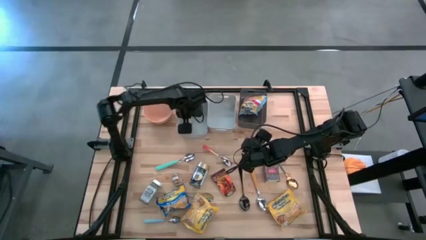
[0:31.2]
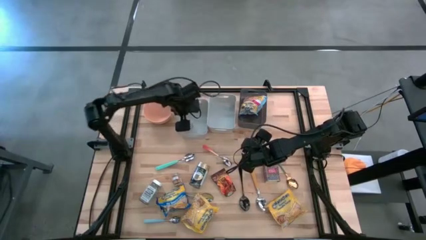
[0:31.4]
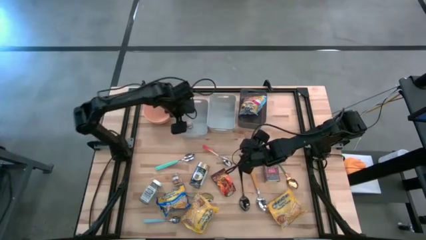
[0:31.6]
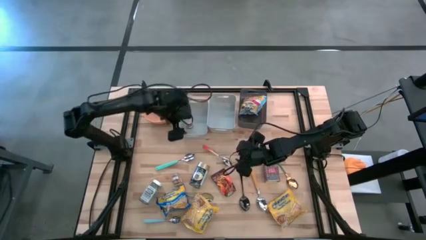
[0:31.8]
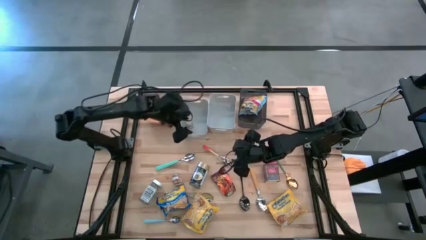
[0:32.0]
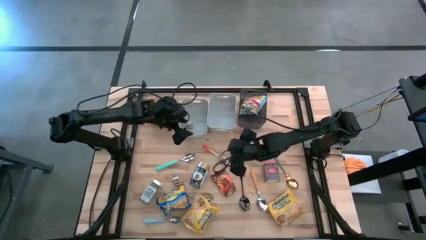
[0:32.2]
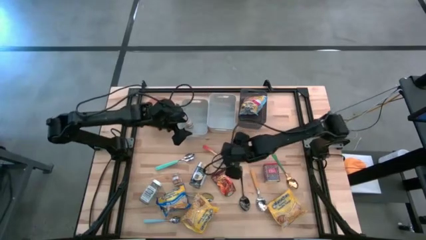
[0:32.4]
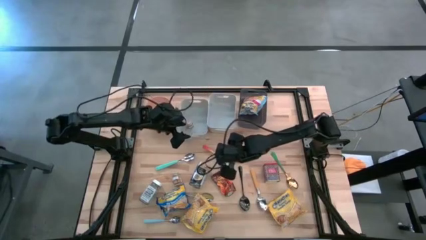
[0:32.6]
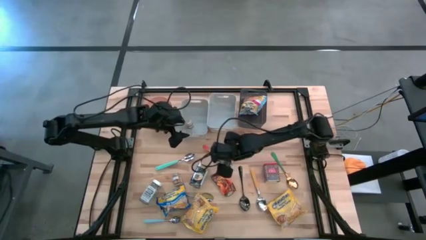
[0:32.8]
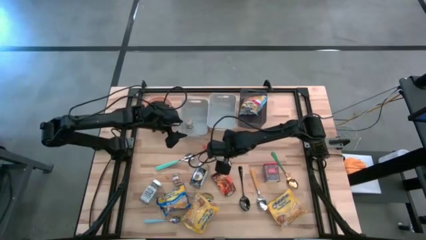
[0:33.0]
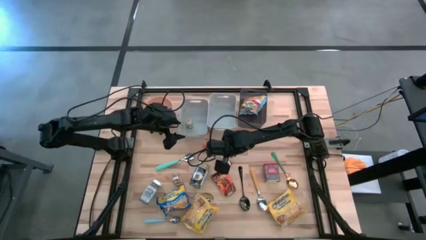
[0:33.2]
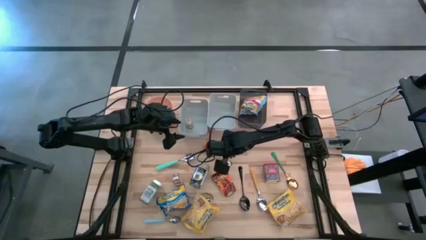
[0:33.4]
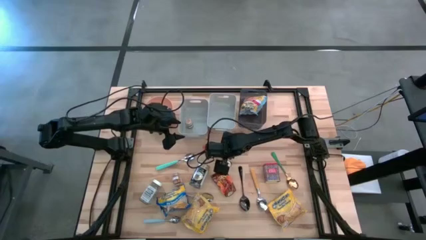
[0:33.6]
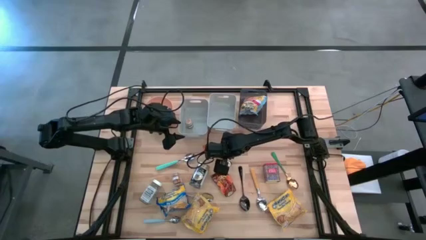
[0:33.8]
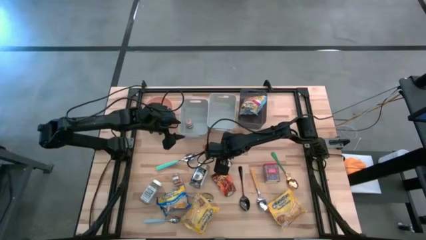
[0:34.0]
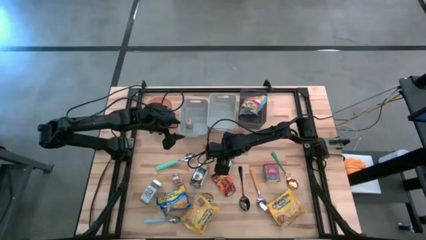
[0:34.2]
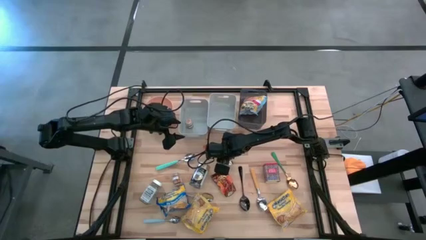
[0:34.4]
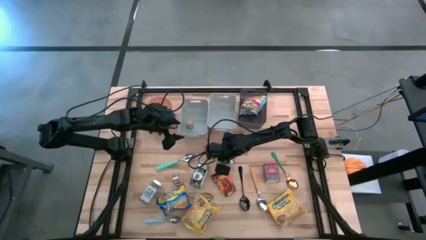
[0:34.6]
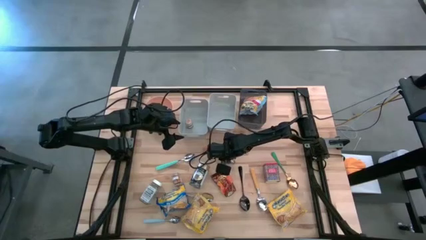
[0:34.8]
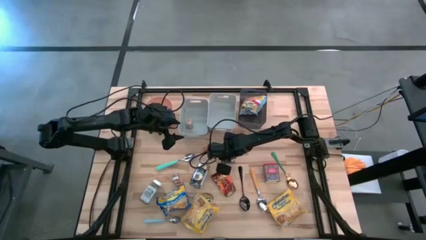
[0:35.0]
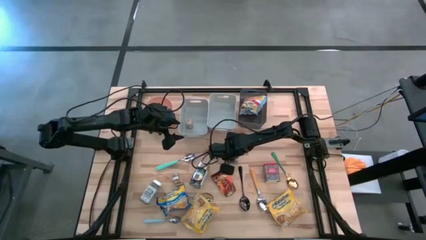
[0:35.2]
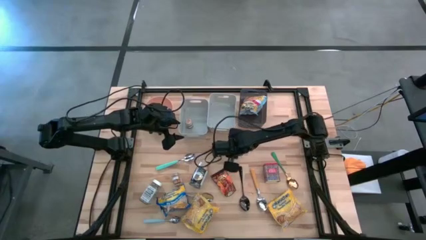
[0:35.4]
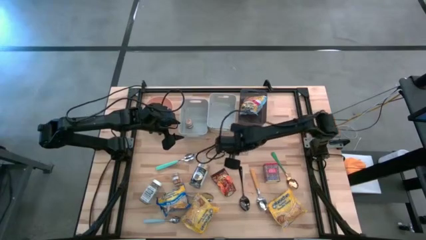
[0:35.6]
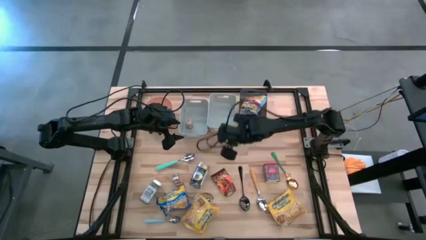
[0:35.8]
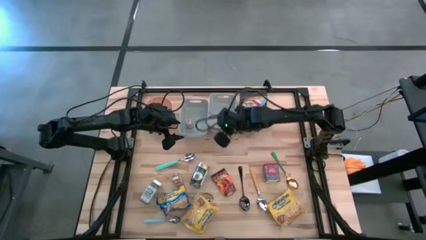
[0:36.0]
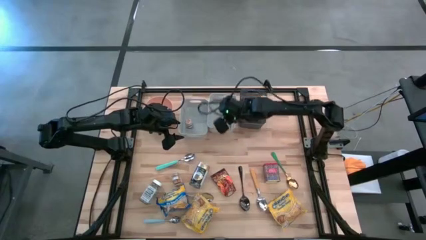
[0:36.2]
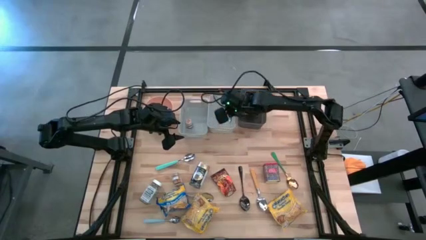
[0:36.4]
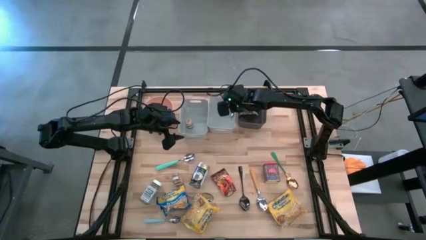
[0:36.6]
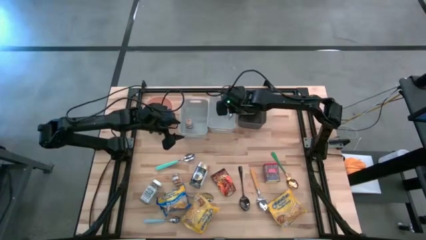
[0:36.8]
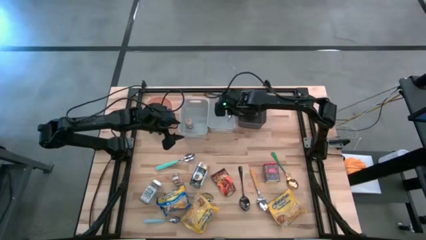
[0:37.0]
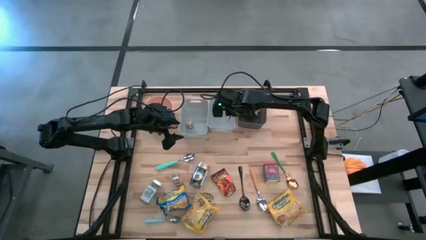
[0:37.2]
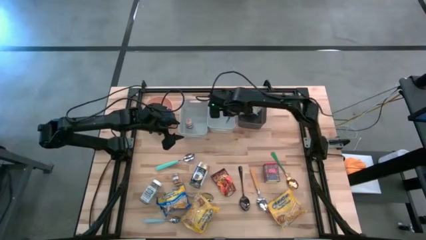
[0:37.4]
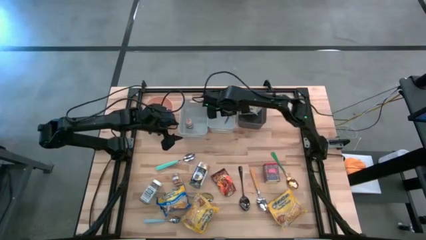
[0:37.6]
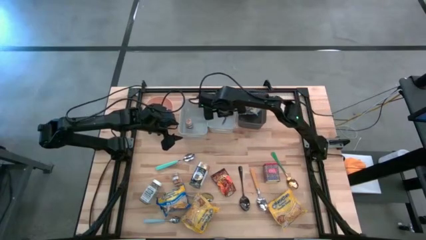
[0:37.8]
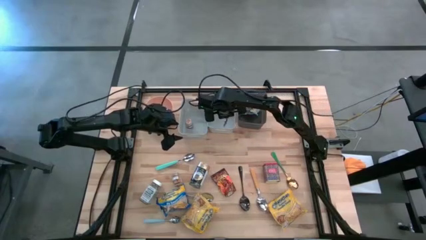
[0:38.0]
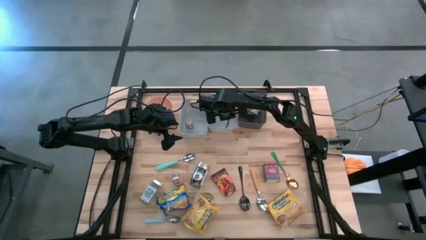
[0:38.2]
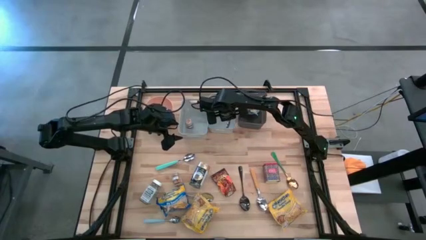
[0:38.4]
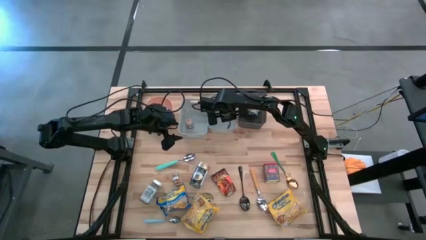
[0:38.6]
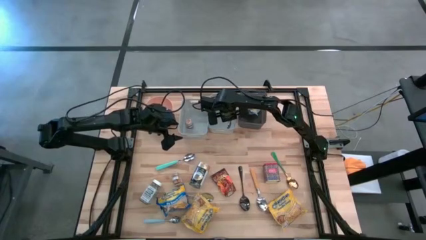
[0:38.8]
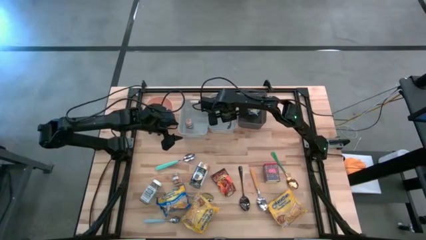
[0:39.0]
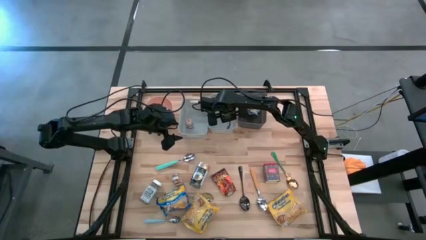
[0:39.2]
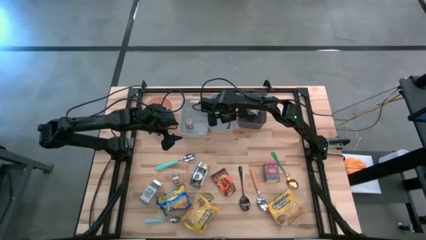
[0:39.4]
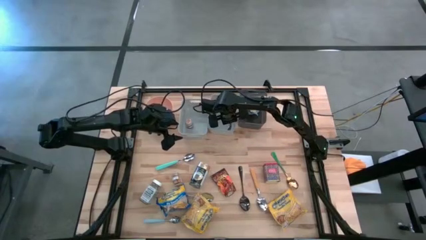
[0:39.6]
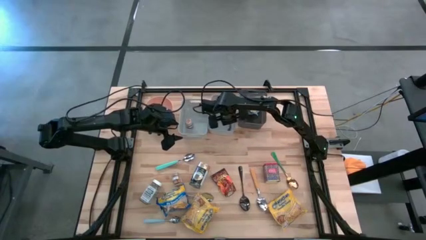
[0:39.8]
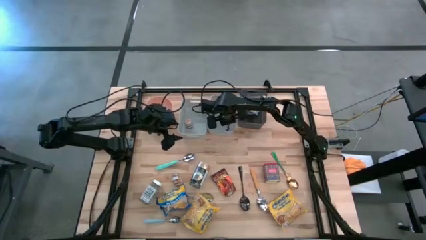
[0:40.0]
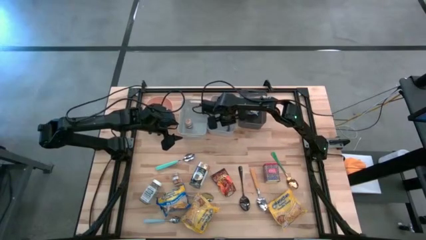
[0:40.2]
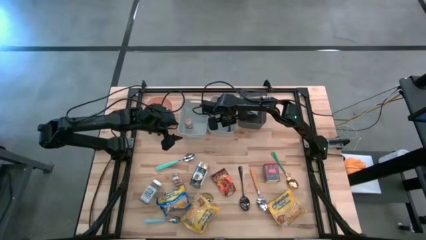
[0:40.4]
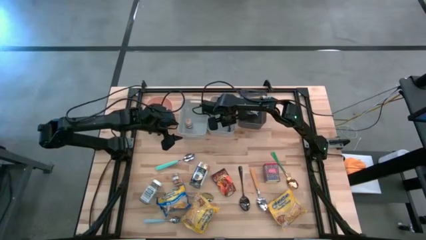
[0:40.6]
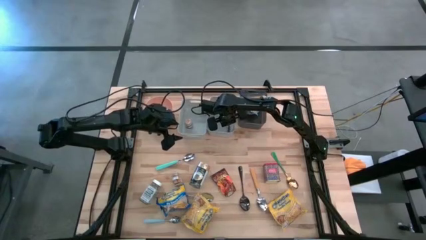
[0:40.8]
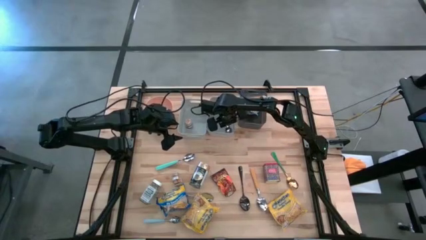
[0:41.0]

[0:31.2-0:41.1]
Put the orange spoon into the right gray bin
